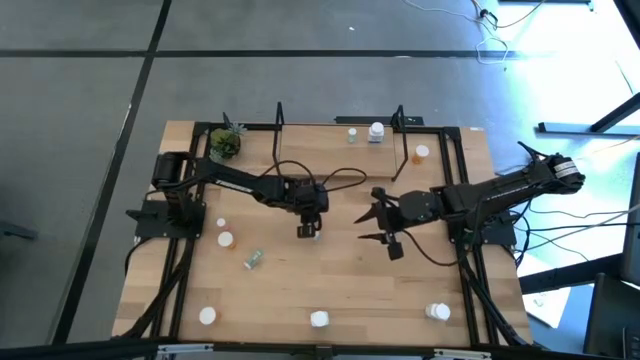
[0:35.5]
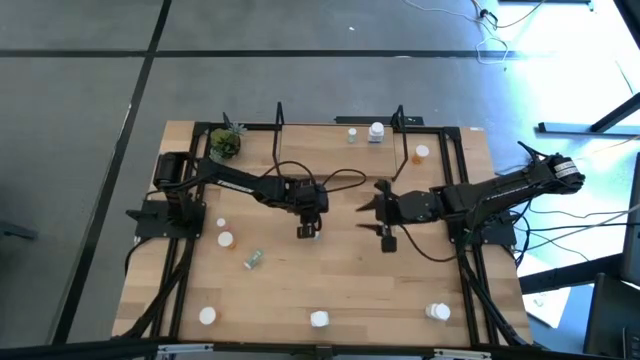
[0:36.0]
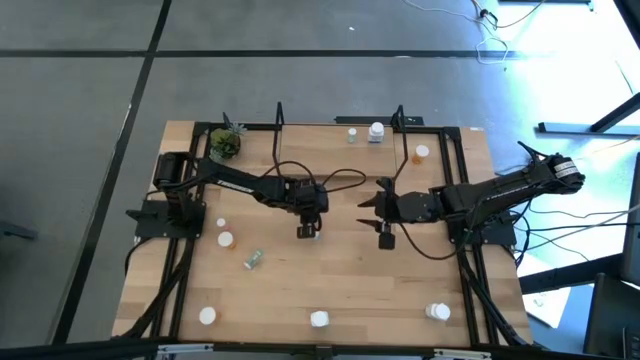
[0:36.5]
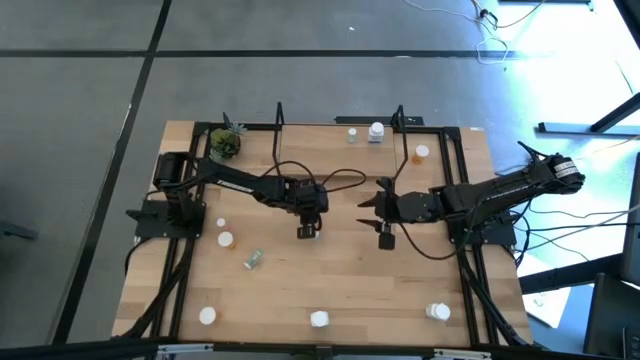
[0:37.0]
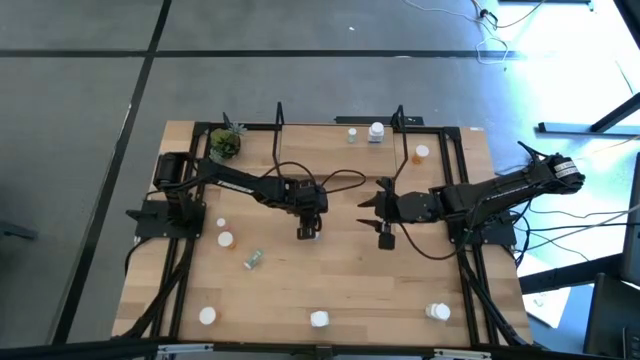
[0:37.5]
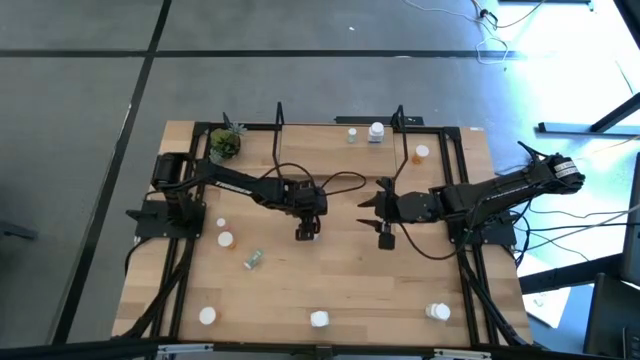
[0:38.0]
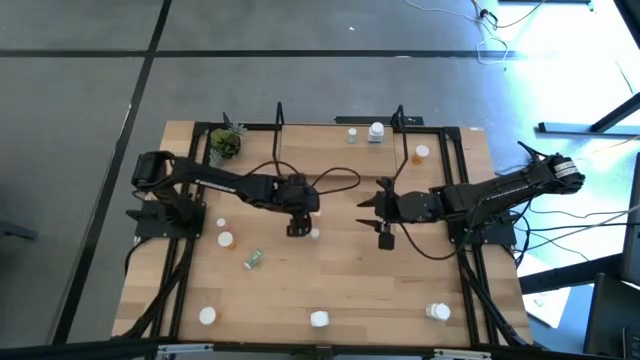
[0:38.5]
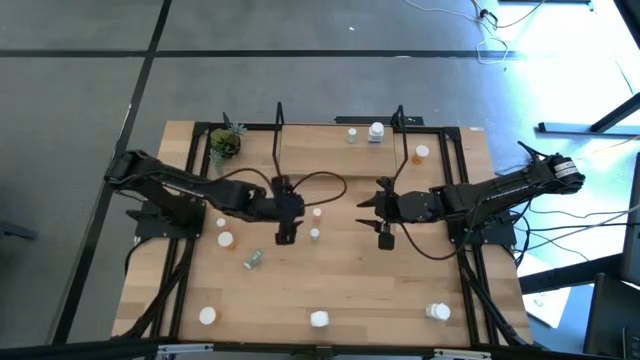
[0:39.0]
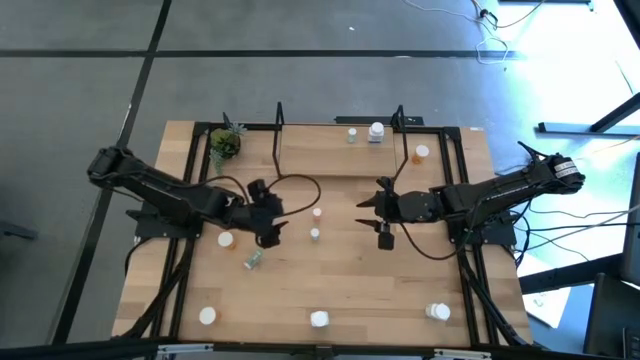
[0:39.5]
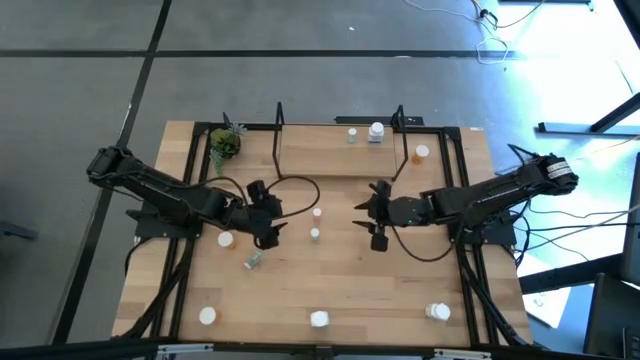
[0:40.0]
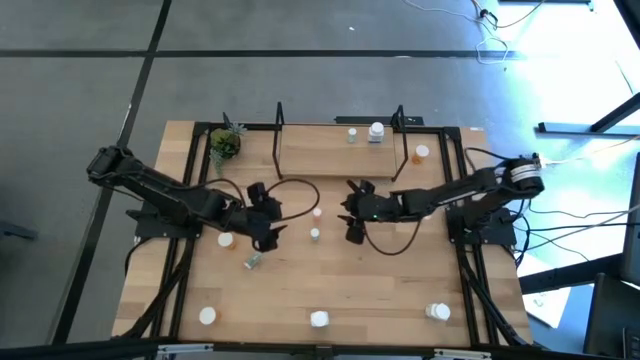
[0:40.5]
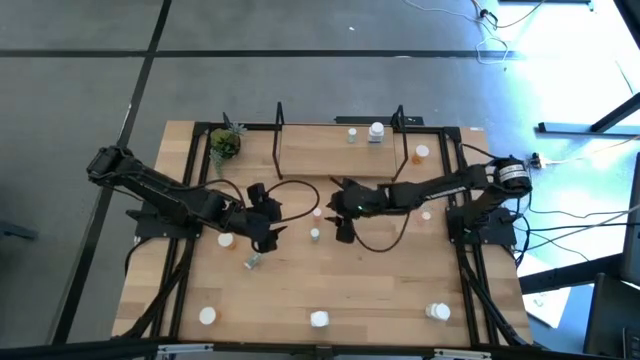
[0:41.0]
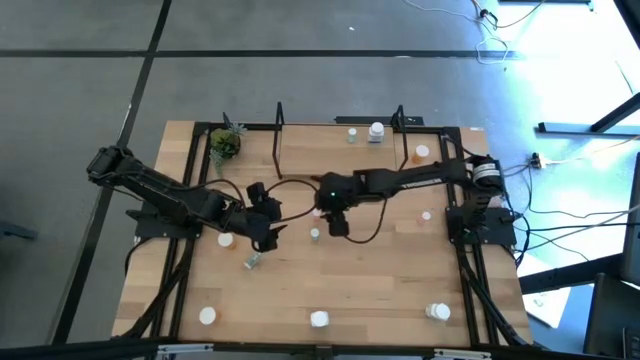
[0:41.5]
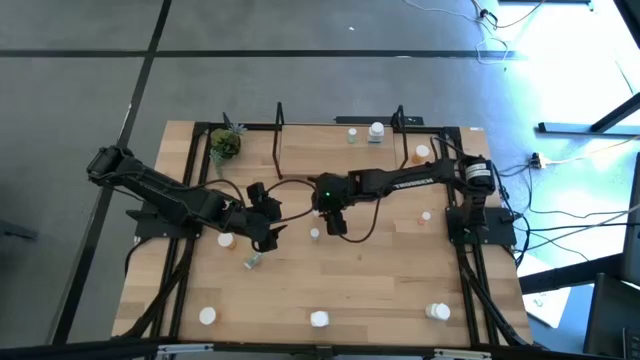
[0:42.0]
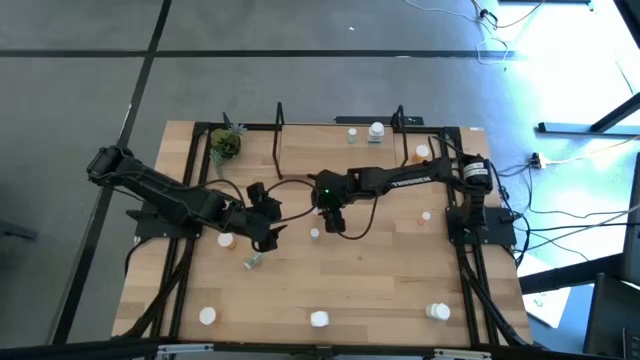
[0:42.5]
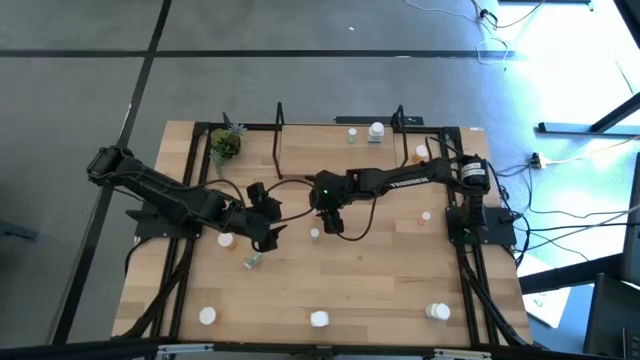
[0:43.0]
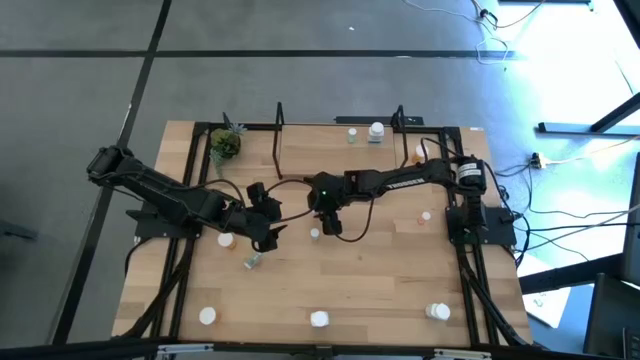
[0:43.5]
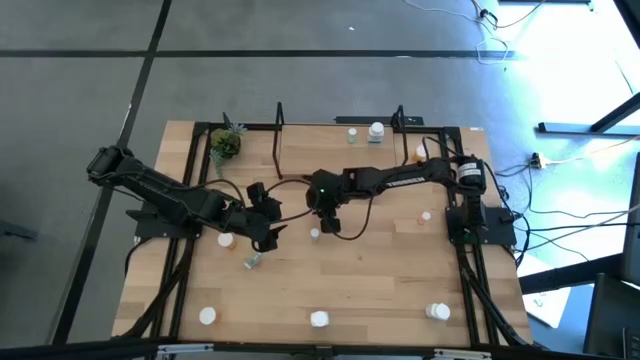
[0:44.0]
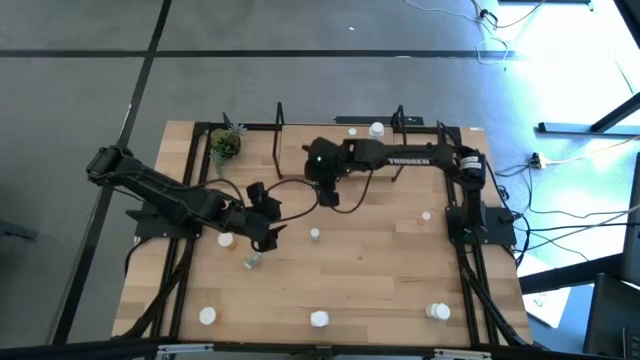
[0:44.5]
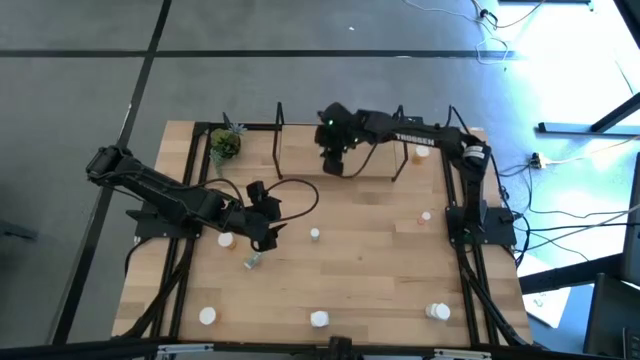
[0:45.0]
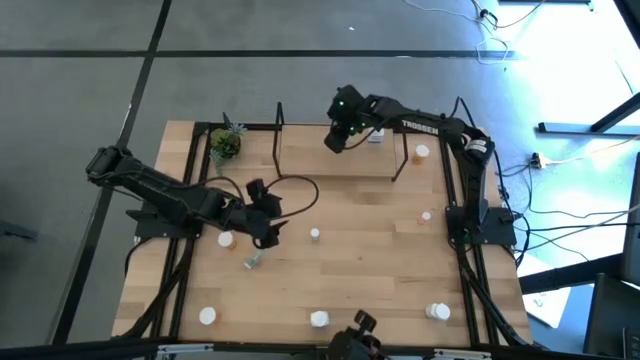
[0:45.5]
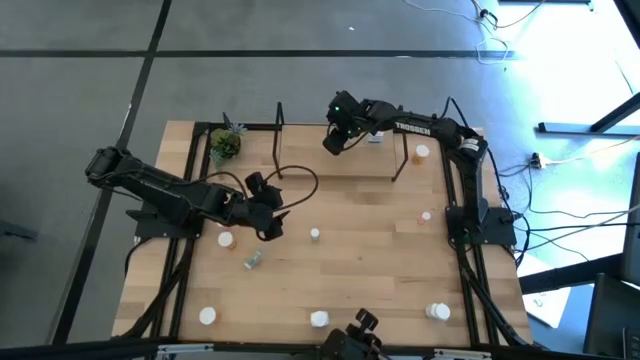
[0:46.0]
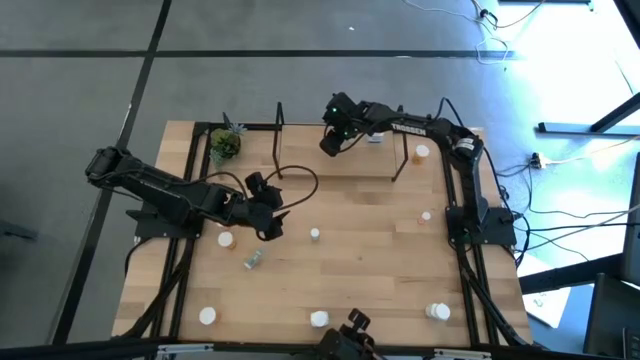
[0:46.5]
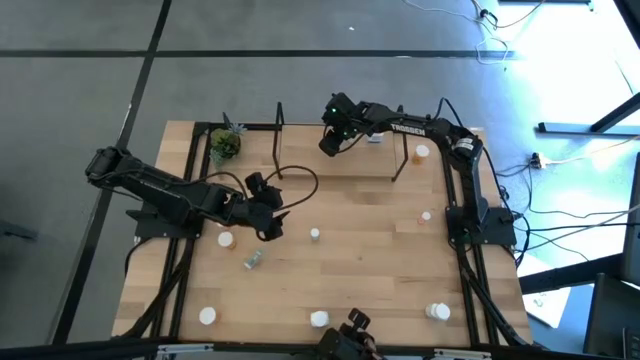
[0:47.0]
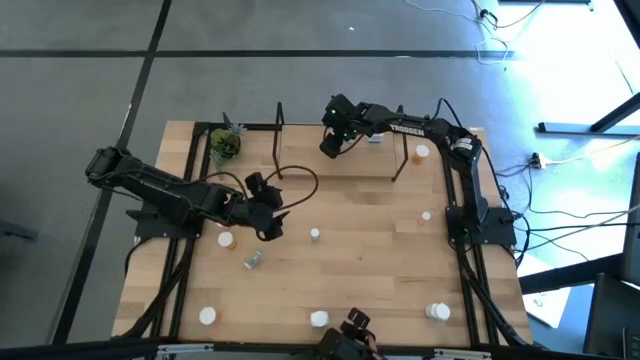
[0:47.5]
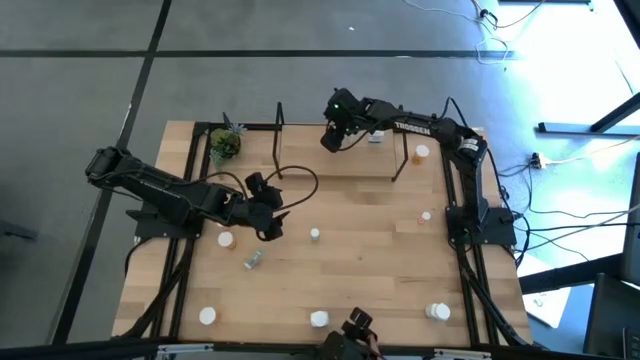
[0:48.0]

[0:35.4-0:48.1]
Task: Pick and place medicine bottles onto shelf by color
Put the middle pink pill bottle on the shelf

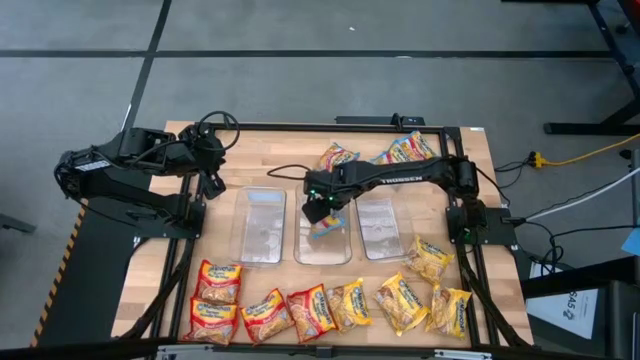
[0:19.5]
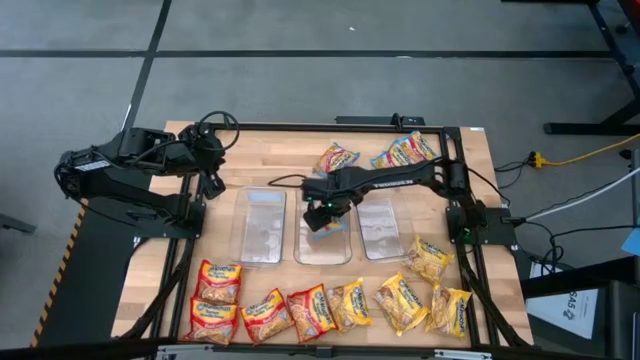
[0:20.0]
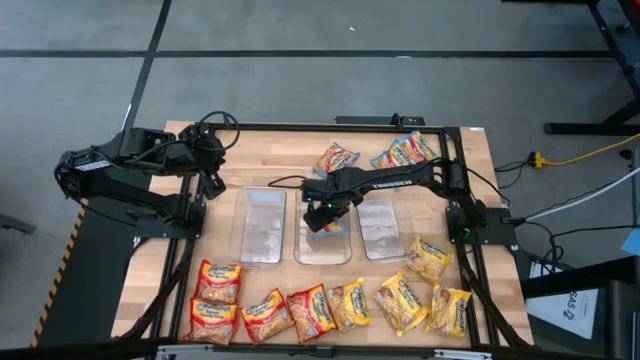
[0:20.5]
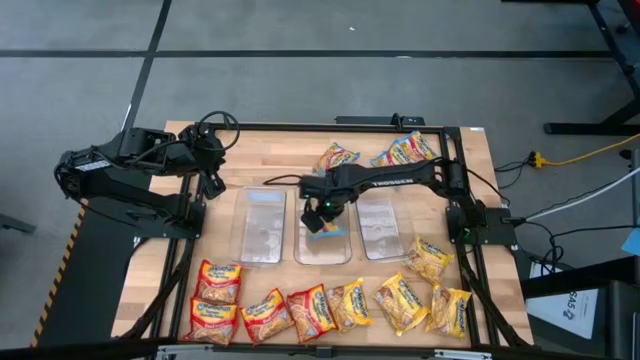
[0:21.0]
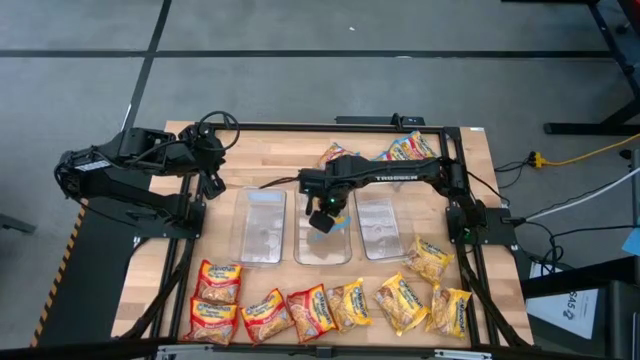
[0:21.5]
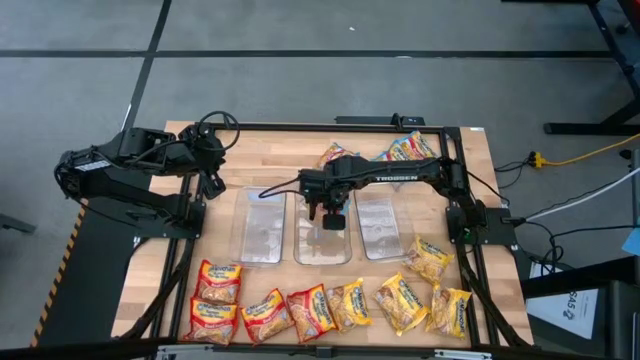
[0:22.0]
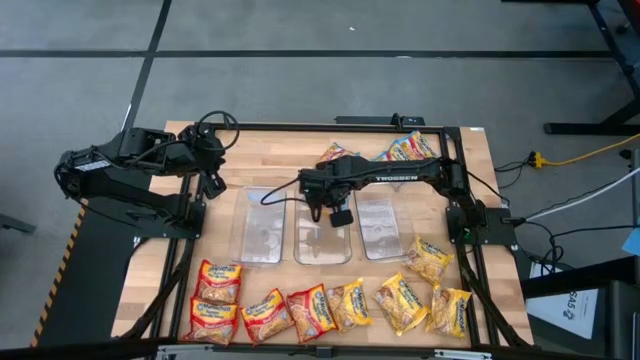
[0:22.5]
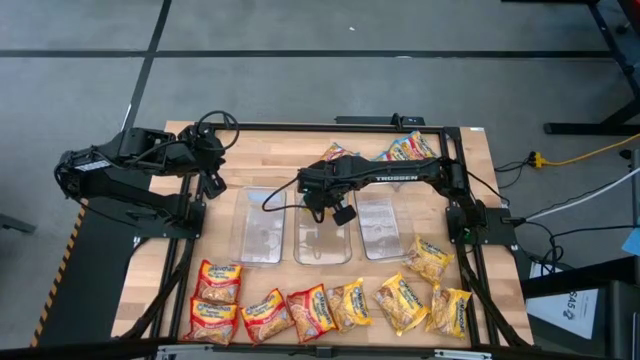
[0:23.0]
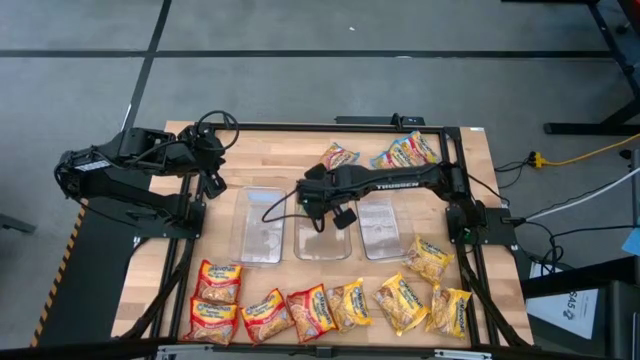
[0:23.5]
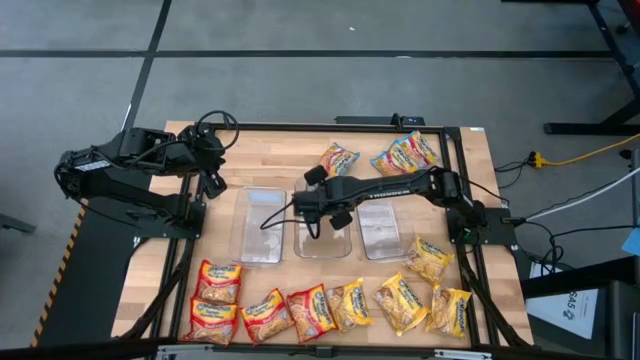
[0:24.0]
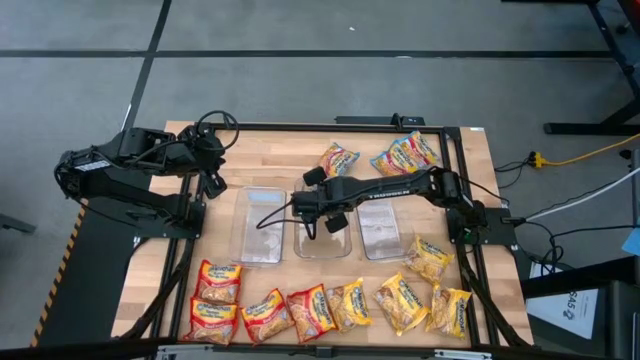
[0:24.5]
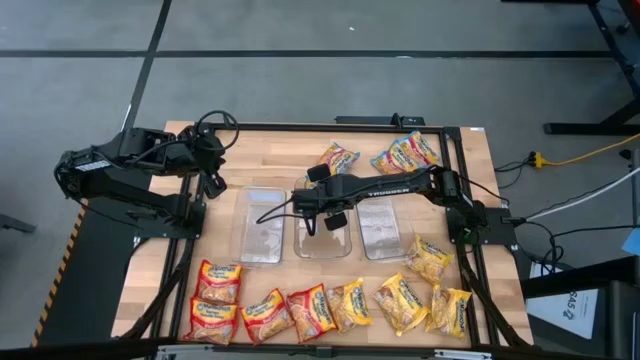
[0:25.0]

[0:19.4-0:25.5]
Task: Sort Maruchan noodles
Put the blue noodle pack into the middle transparent bin
